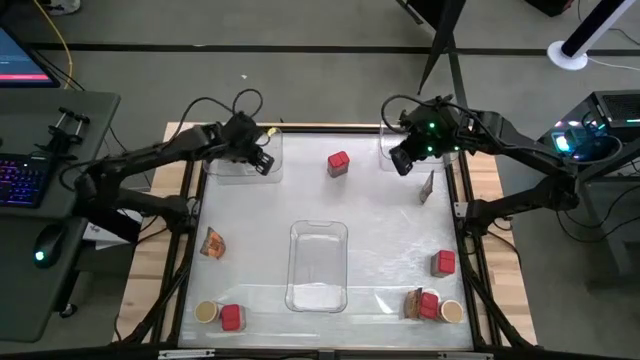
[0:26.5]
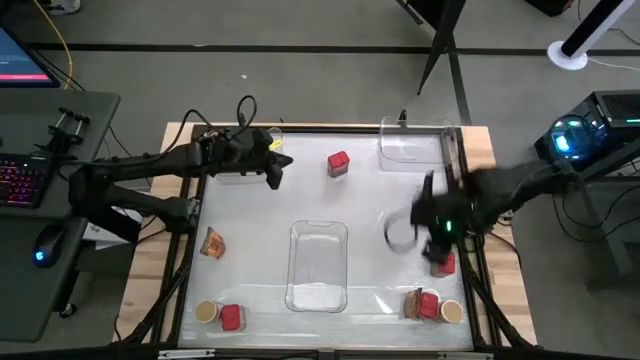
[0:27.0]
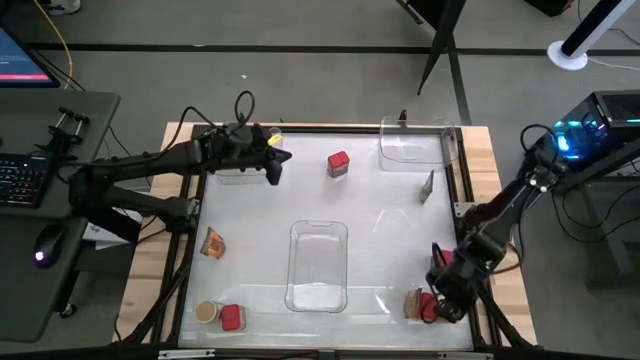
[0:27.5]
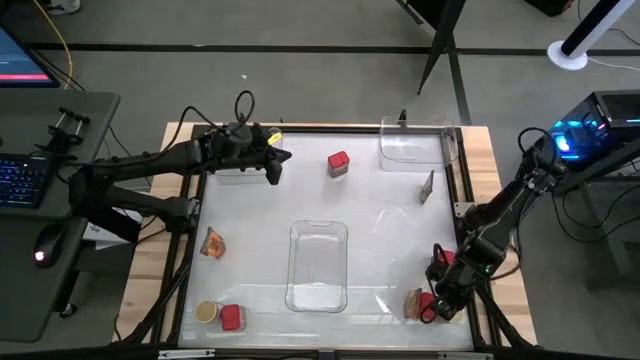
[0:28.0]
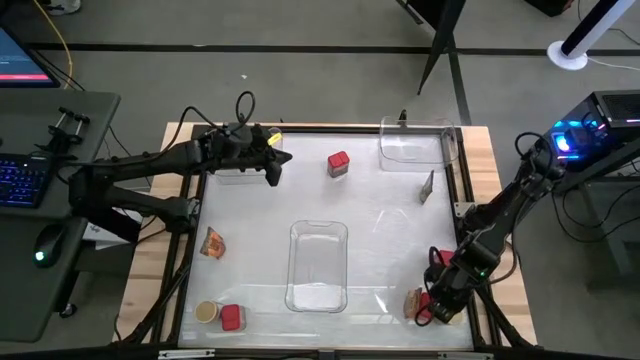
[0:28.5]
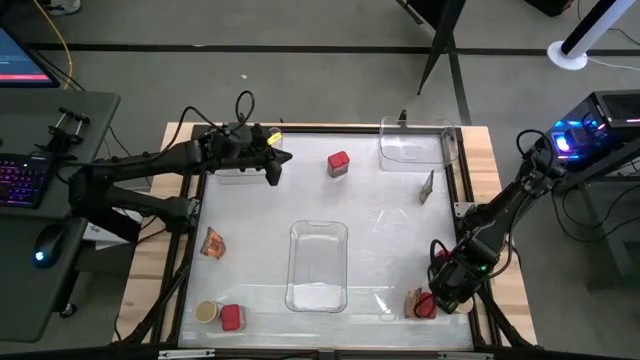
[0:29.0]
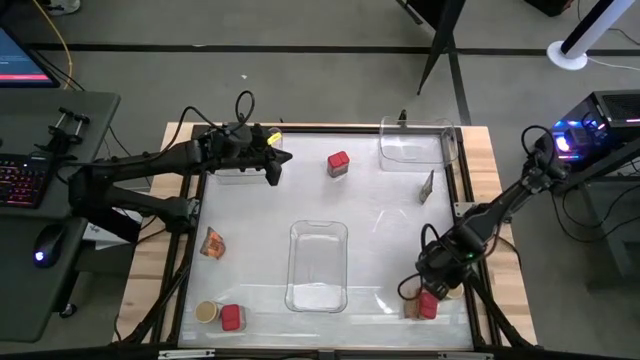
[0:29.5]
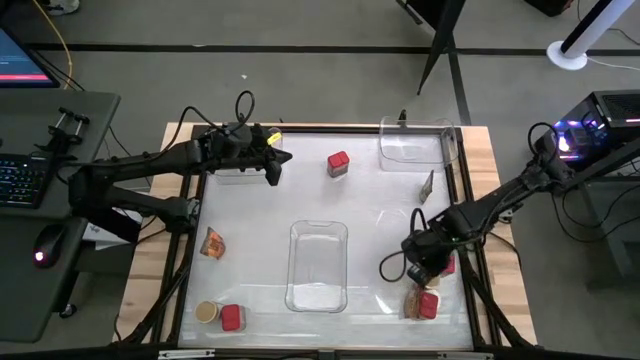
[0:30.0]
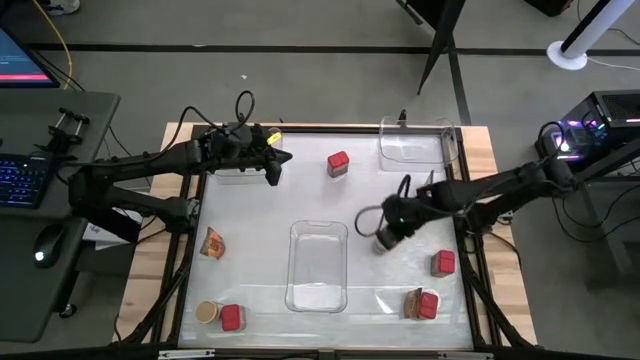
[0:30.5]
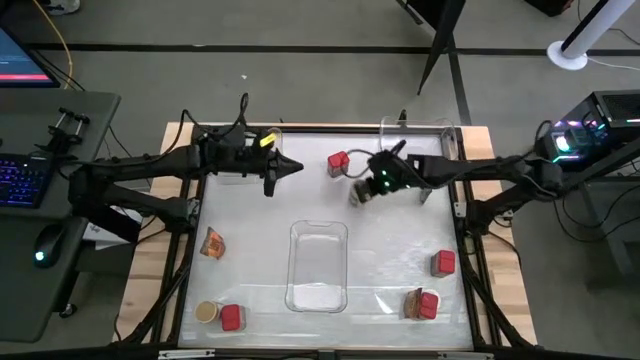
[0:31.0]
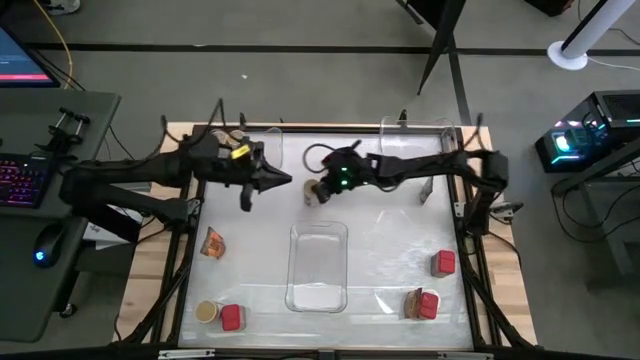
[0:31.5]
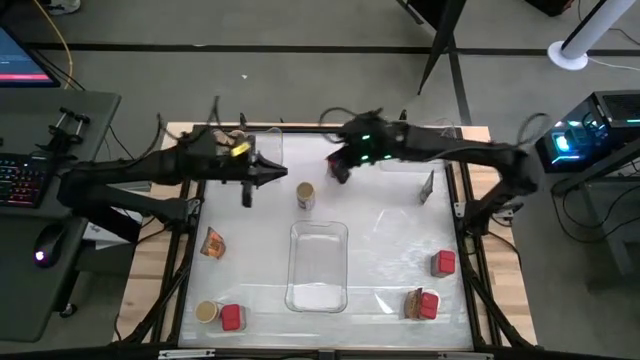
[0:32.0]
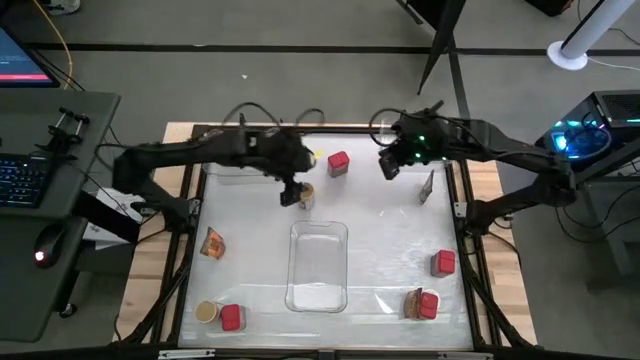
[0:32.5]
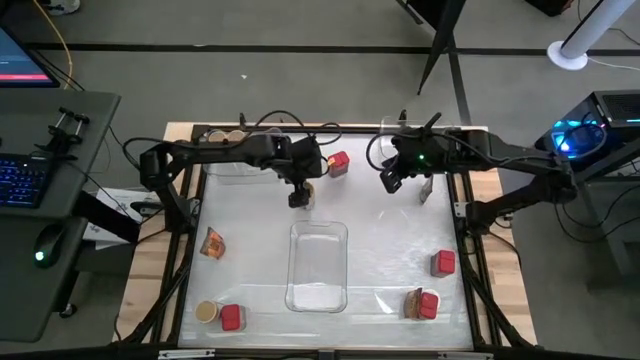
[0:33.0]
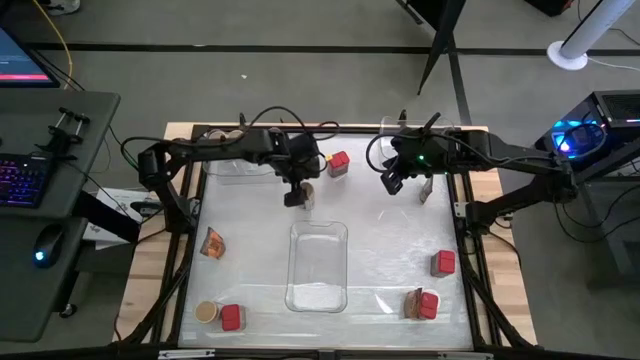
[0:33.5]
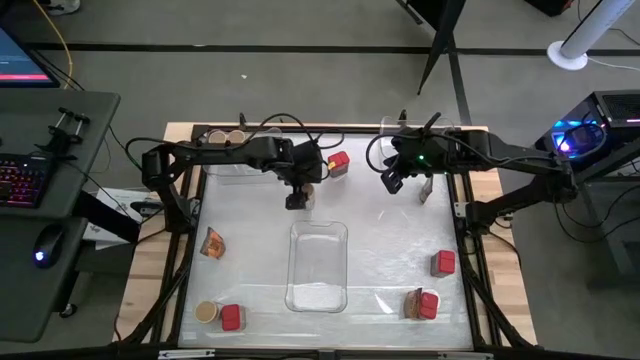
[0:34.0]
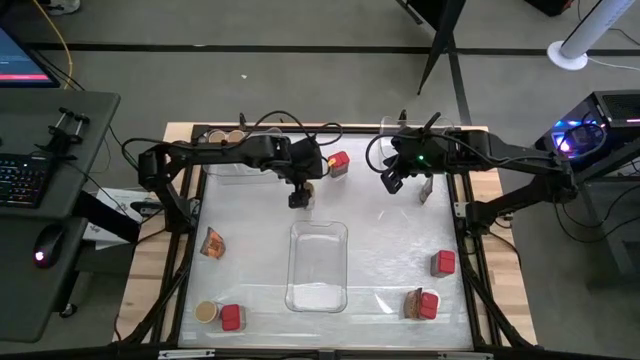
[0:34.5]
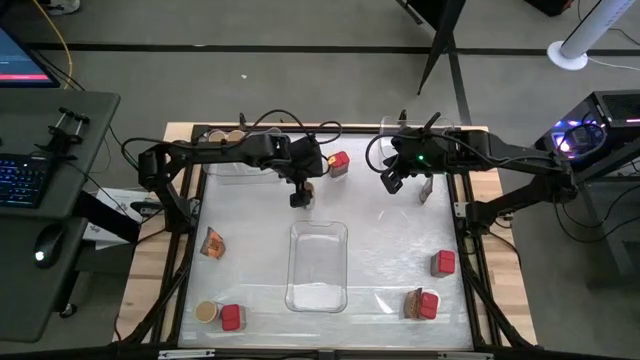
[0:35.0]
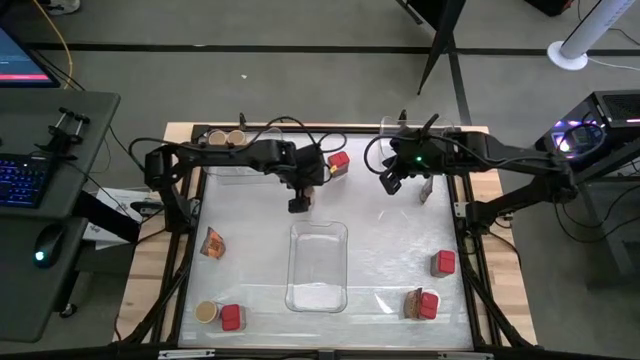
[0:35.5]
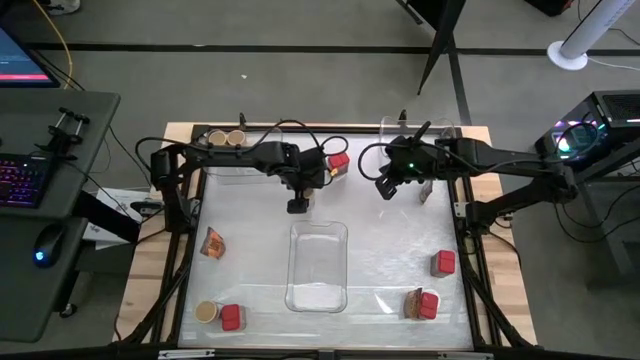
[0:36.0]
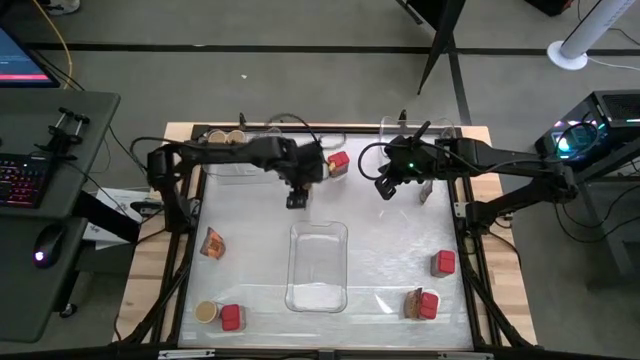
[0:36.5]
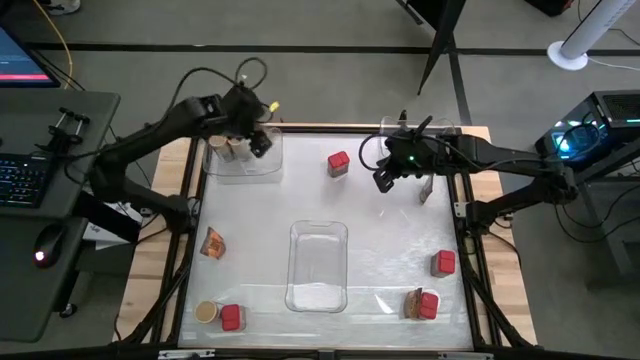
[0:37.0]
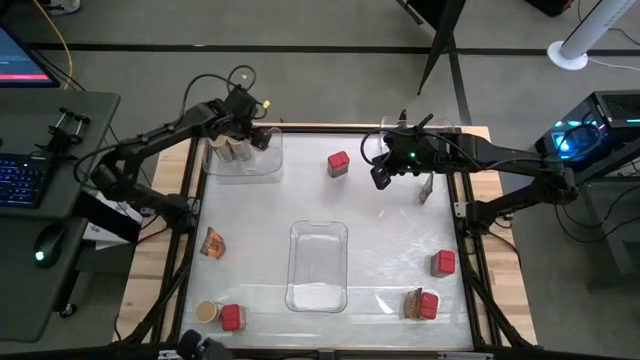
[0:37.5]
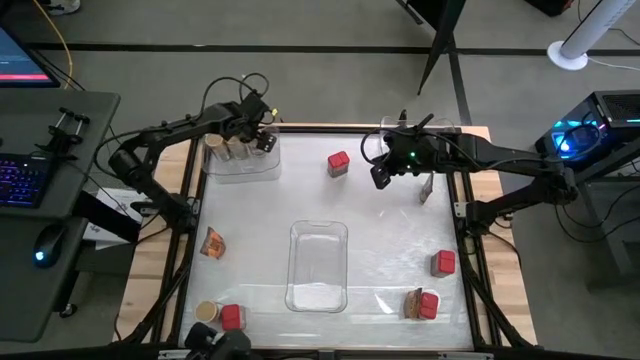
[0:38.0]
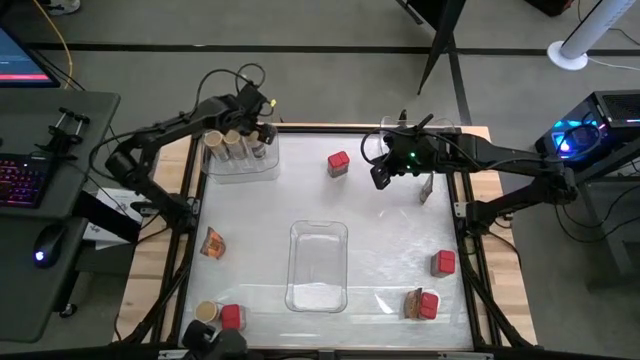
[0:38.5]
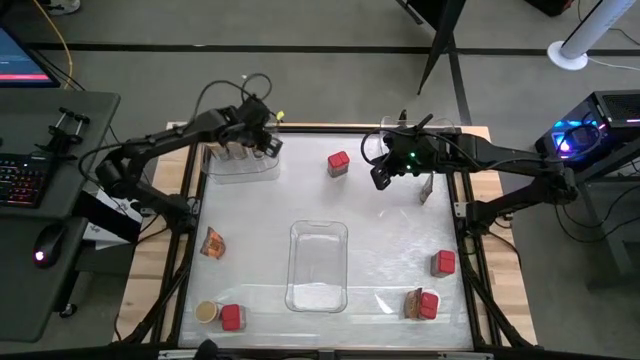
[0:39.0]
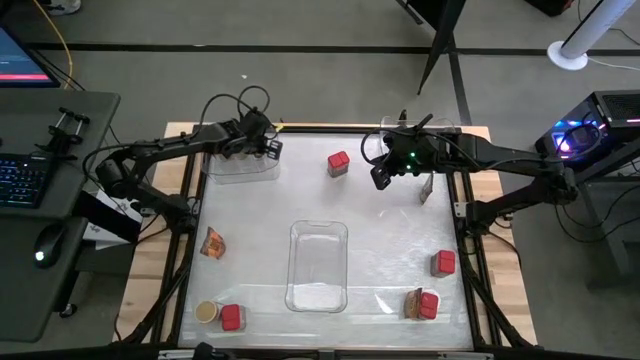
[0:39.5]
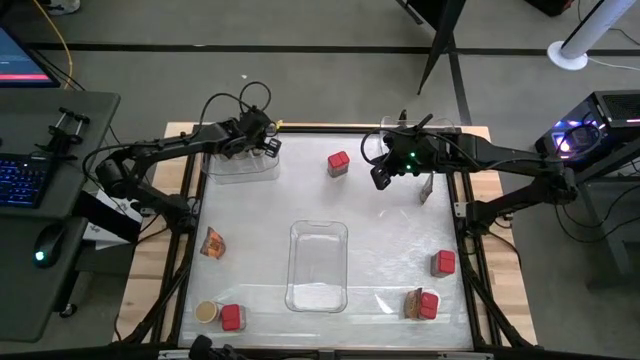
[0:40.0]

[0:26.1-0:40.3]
Task: Sort spices by type
Put the right gold seasoning bottle into the top left transparent bin

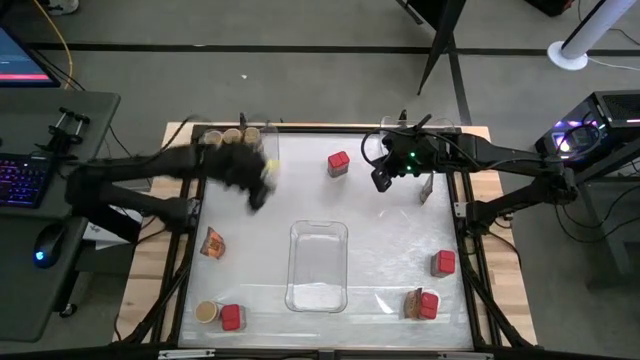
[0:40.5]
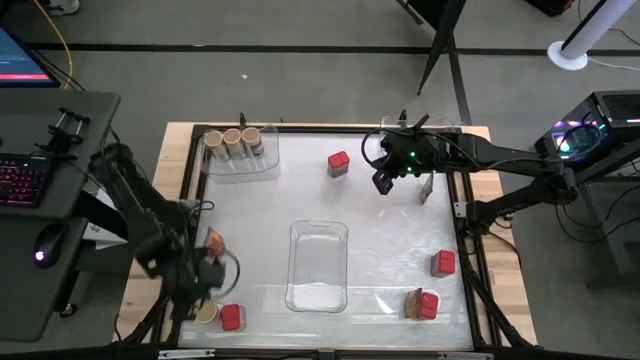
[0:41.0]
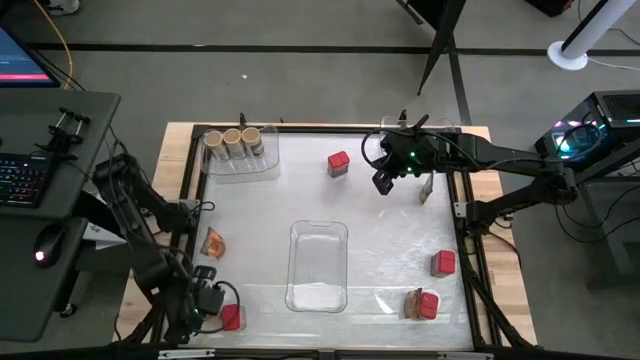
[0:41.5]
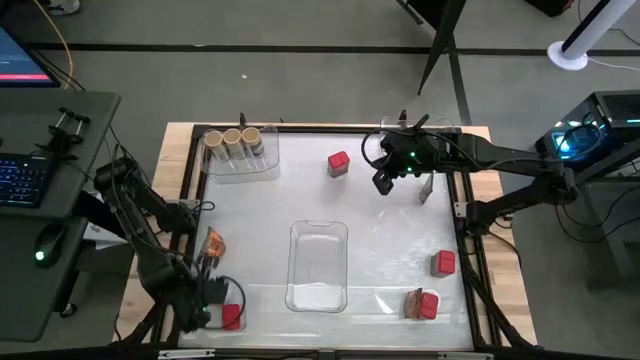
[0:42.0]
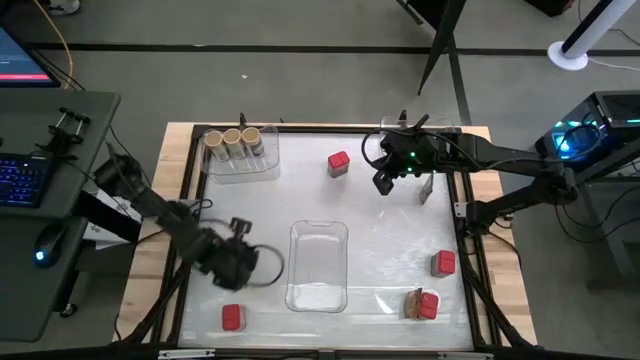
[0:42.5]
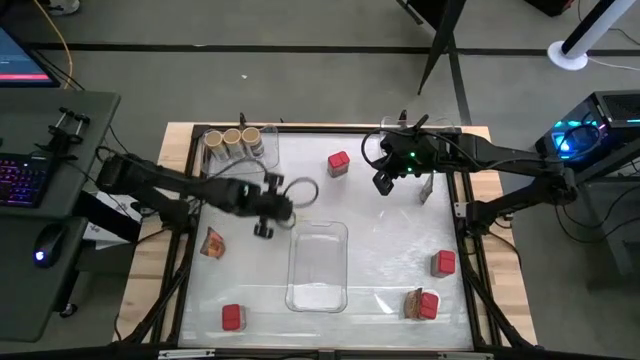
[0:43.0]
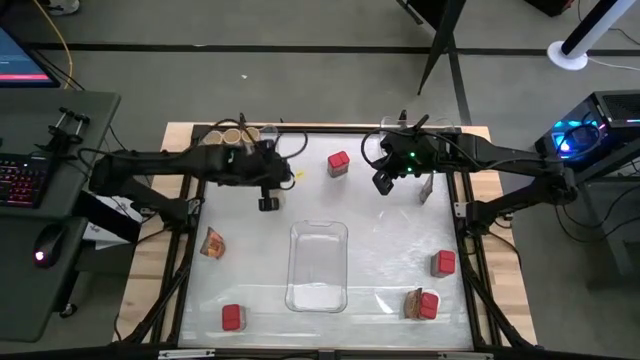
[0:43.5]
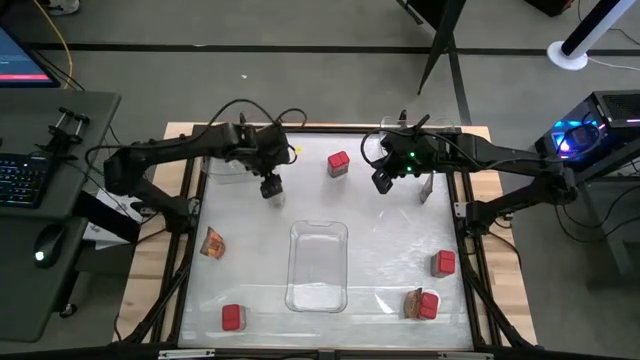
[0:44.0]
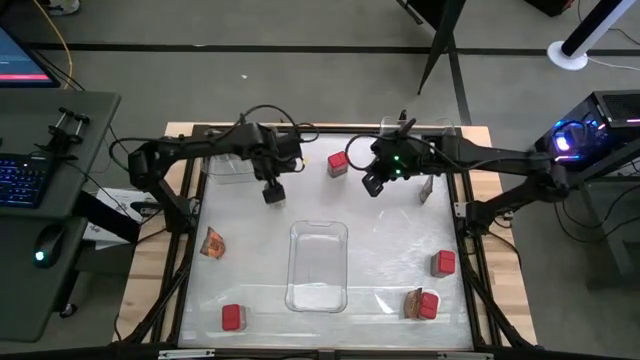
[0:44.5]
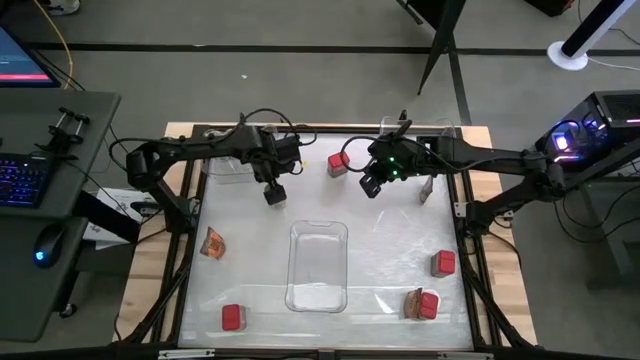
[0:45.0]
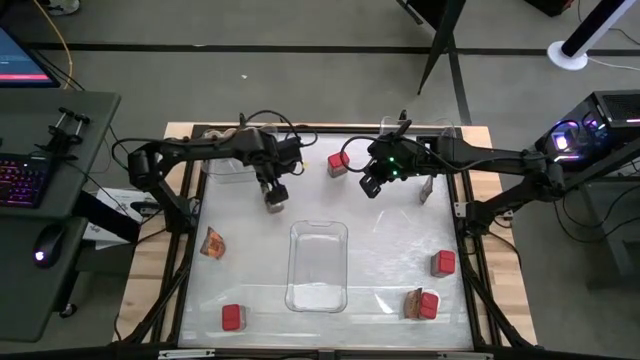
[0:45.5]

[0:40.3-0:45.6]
Put the gold seasoning bottle into the top left transparent bin

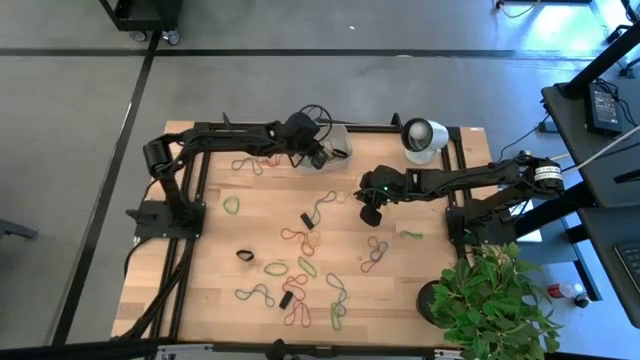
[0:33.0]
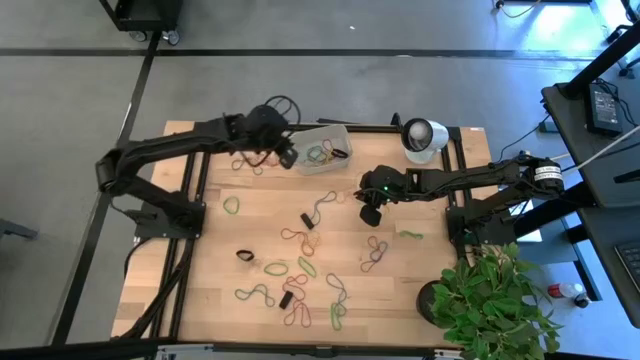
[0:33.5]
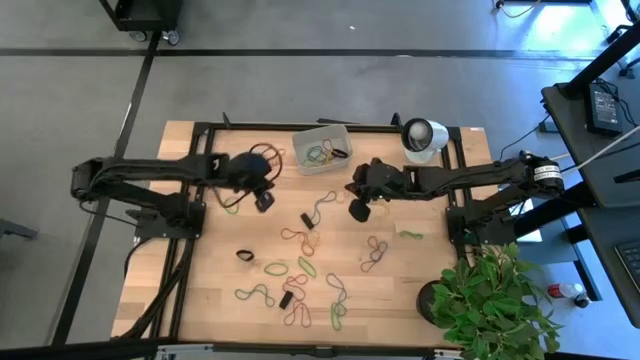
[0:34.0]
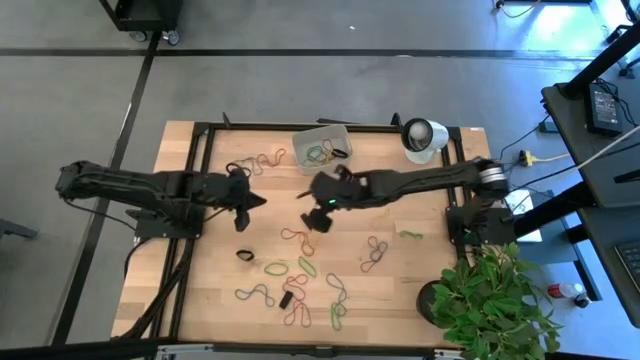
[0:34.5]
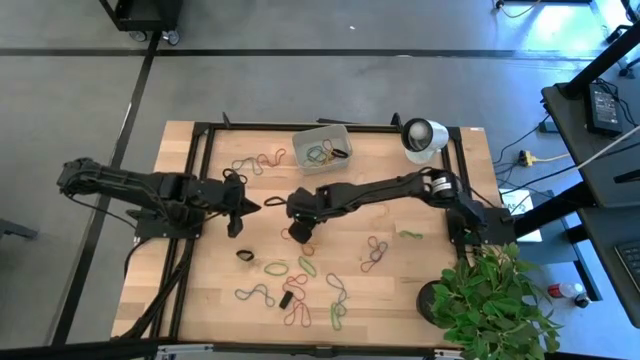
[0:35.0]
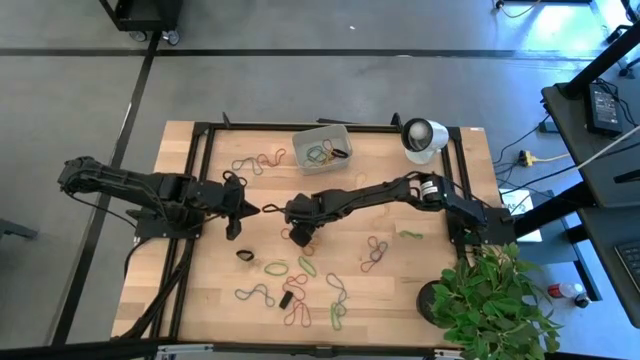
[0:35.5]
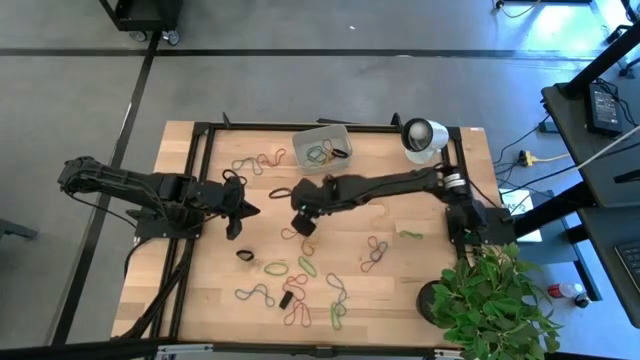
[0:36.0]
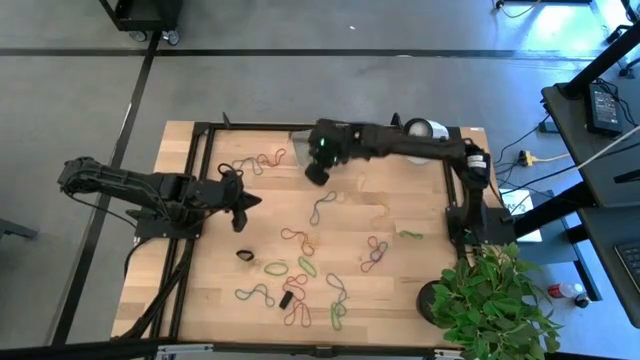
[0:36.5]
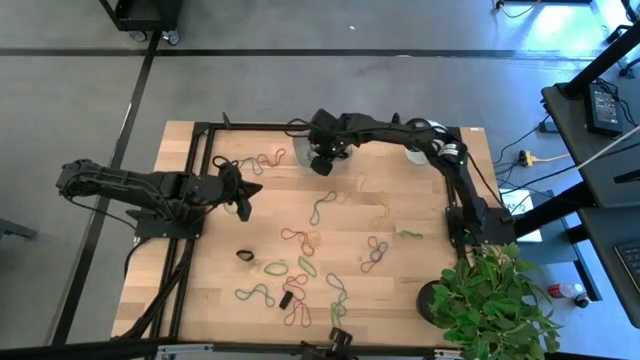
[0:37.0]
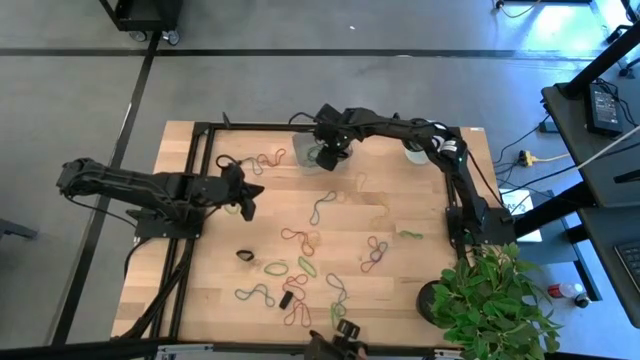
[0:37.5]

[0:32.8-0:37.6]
Task: Pick and place rubber bands into bin
Put the top black rubber band into the gray bin
